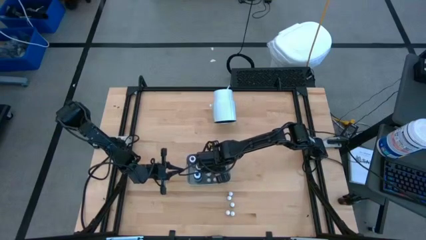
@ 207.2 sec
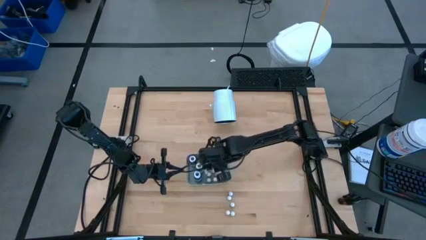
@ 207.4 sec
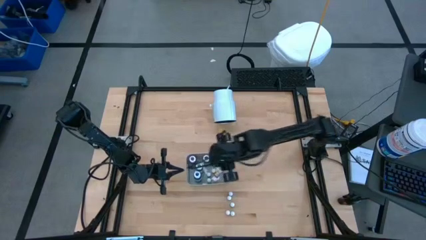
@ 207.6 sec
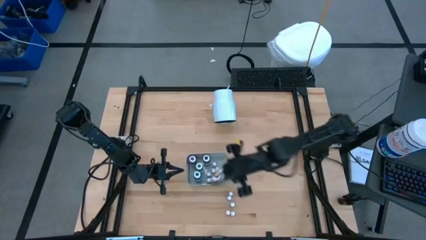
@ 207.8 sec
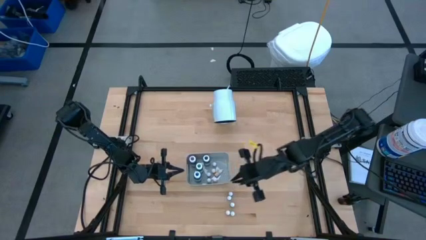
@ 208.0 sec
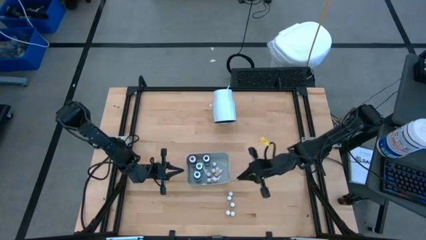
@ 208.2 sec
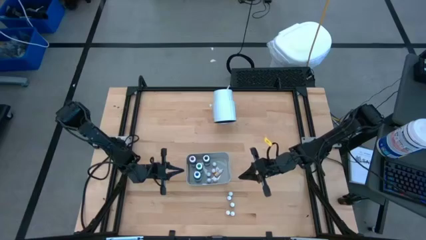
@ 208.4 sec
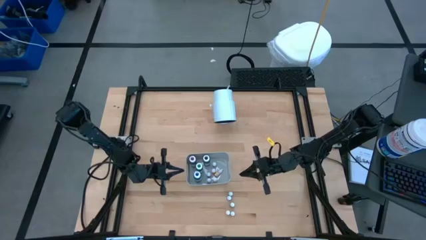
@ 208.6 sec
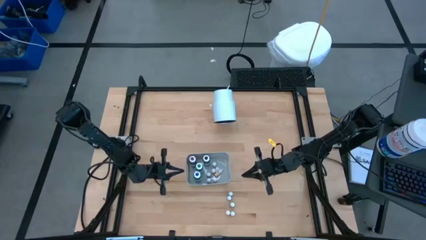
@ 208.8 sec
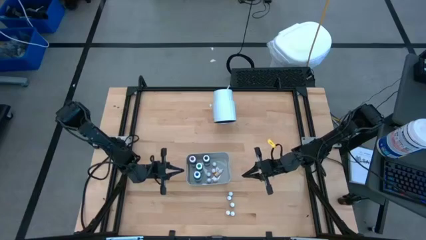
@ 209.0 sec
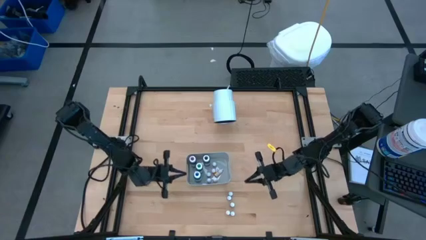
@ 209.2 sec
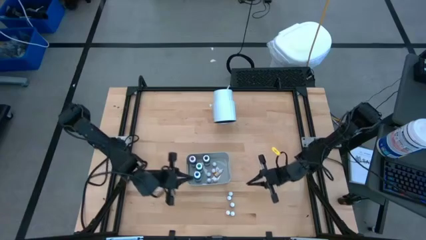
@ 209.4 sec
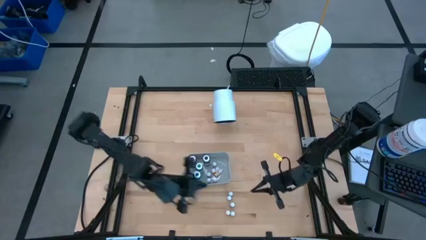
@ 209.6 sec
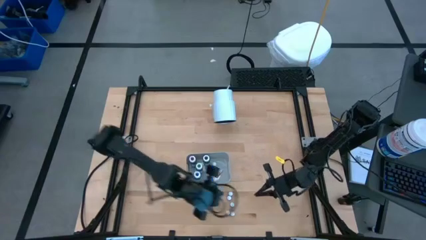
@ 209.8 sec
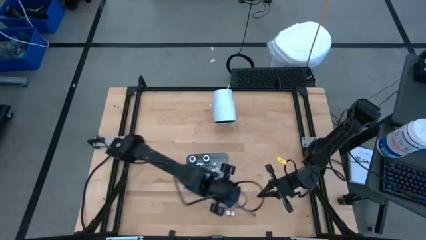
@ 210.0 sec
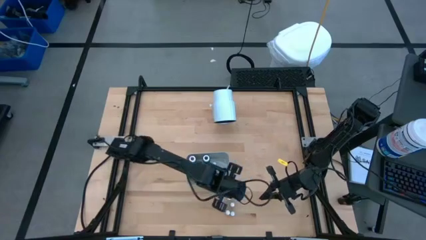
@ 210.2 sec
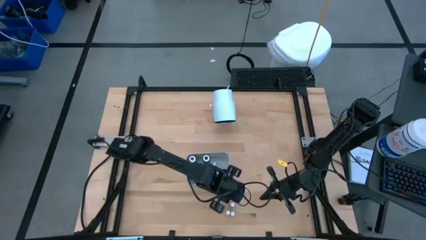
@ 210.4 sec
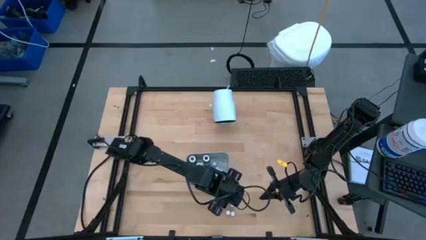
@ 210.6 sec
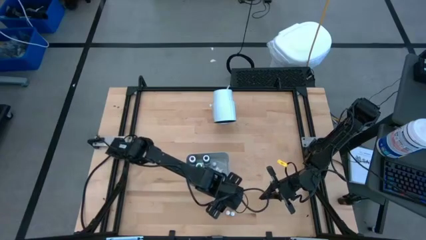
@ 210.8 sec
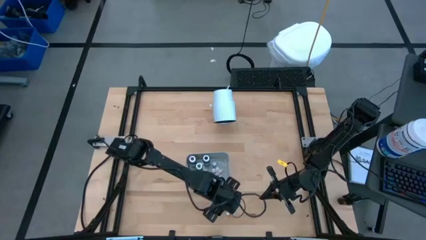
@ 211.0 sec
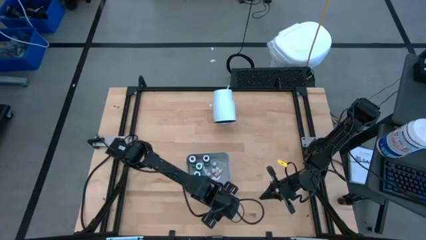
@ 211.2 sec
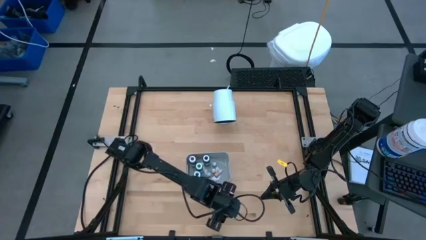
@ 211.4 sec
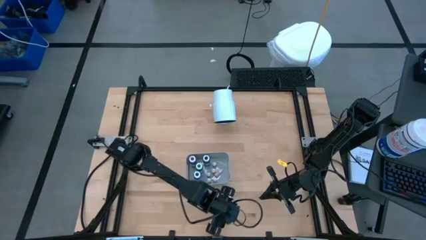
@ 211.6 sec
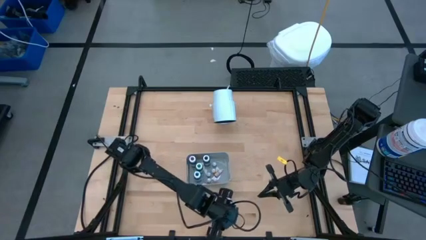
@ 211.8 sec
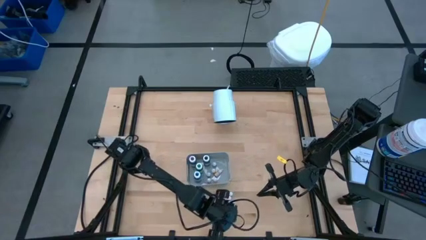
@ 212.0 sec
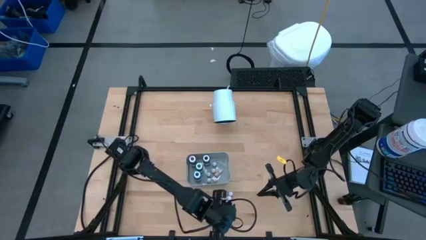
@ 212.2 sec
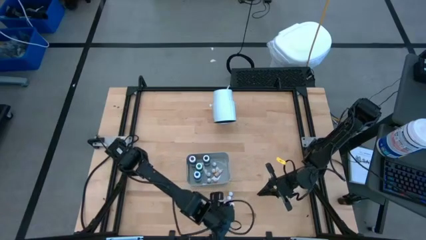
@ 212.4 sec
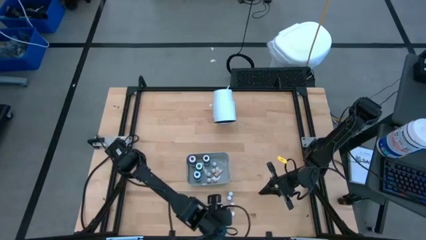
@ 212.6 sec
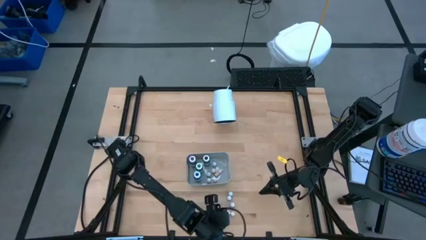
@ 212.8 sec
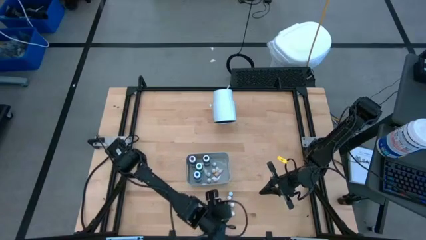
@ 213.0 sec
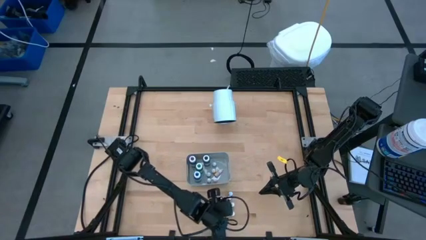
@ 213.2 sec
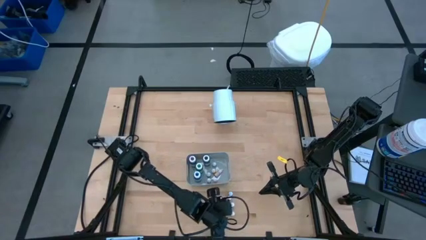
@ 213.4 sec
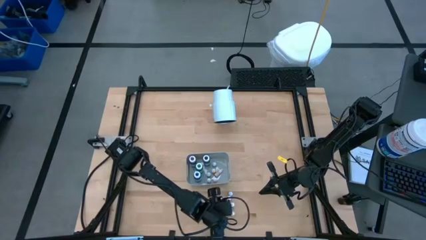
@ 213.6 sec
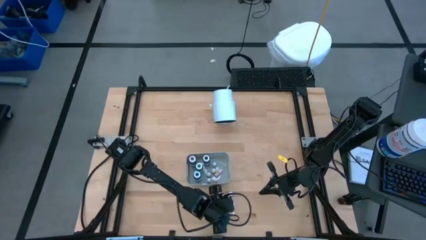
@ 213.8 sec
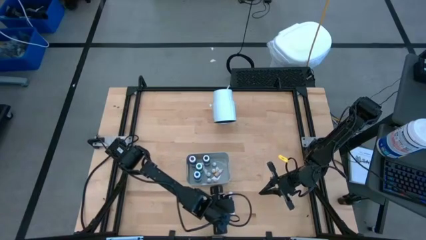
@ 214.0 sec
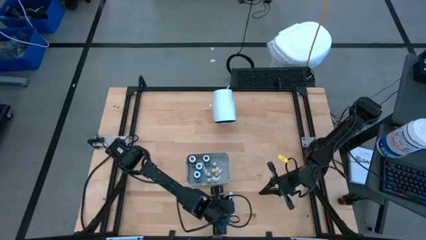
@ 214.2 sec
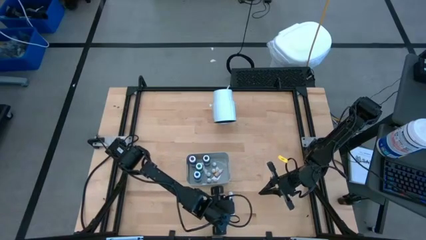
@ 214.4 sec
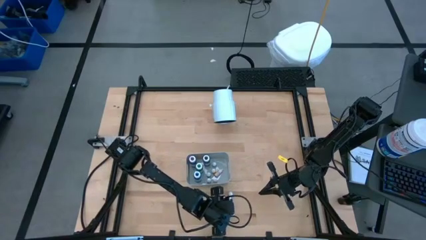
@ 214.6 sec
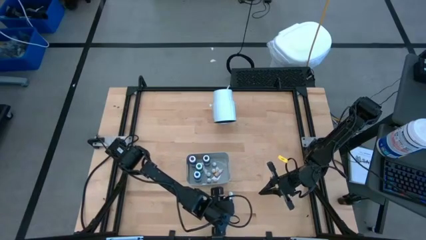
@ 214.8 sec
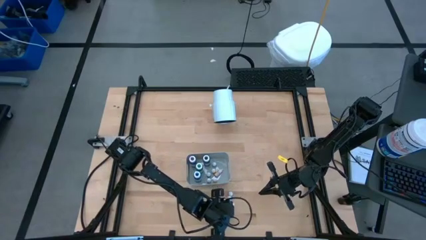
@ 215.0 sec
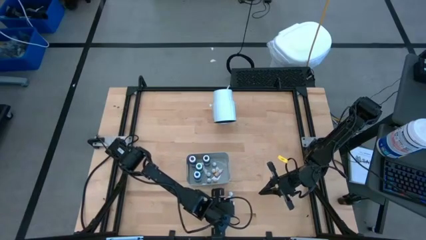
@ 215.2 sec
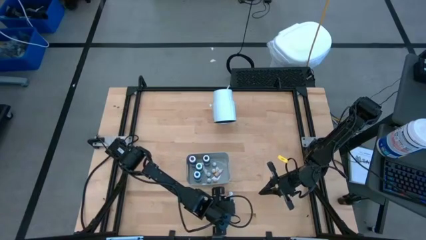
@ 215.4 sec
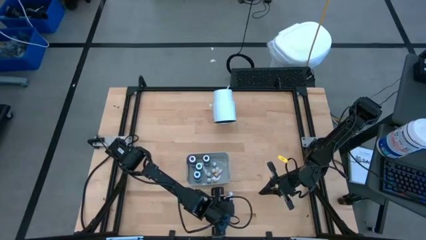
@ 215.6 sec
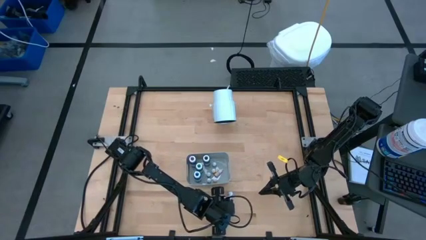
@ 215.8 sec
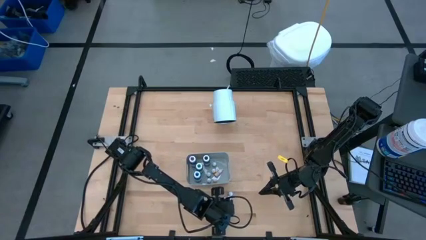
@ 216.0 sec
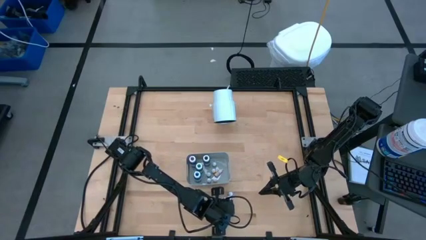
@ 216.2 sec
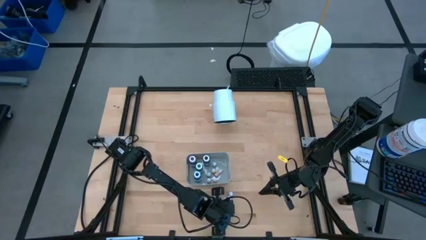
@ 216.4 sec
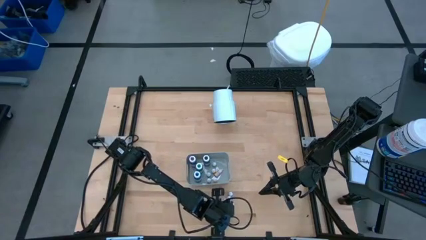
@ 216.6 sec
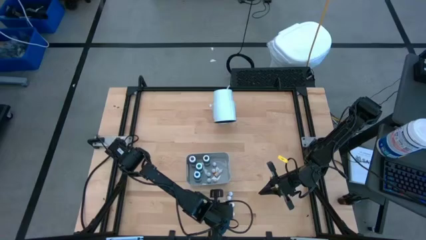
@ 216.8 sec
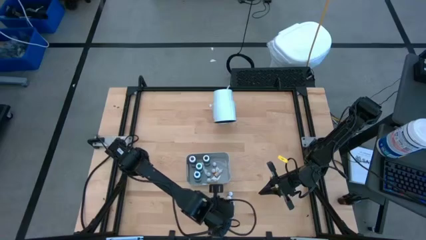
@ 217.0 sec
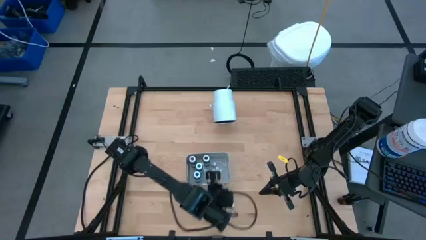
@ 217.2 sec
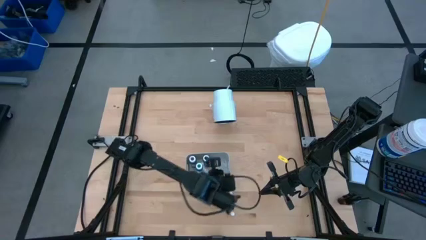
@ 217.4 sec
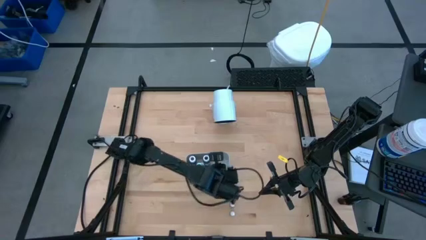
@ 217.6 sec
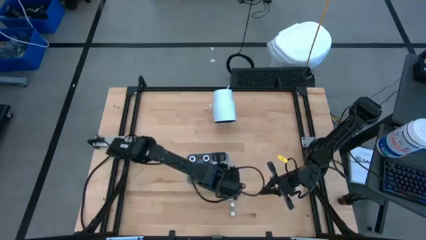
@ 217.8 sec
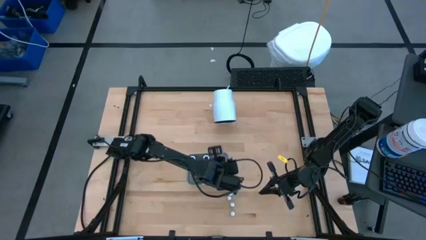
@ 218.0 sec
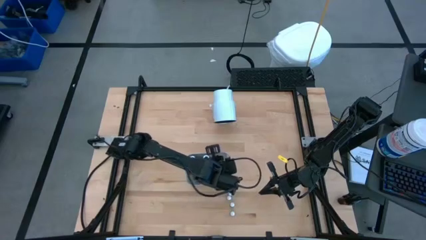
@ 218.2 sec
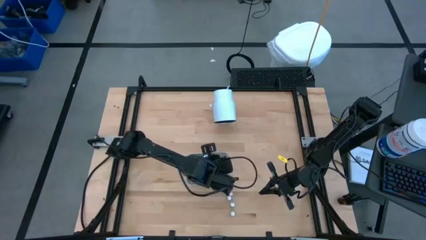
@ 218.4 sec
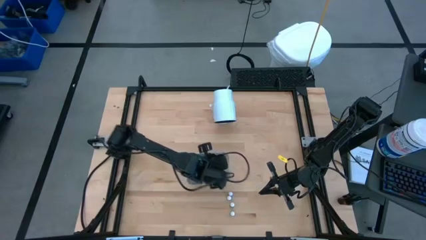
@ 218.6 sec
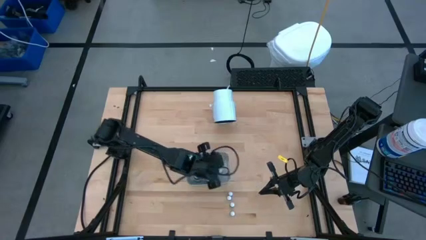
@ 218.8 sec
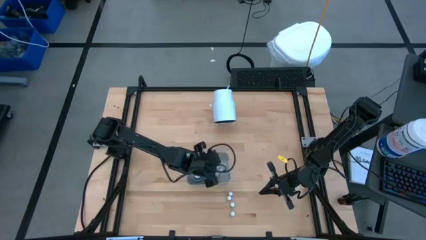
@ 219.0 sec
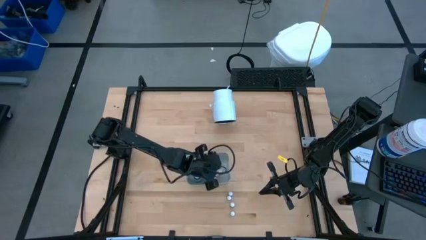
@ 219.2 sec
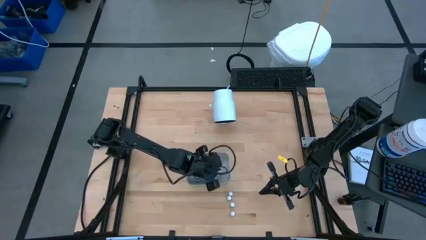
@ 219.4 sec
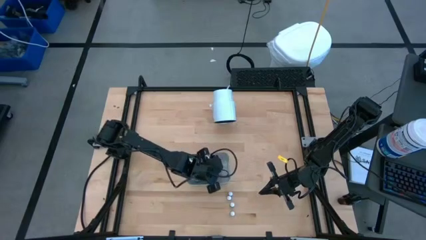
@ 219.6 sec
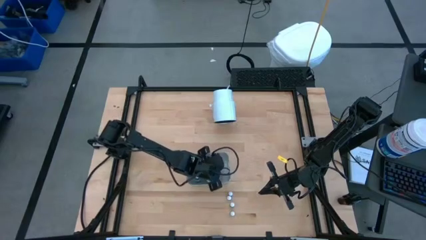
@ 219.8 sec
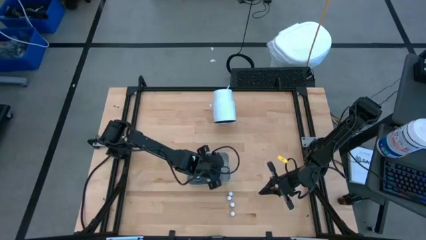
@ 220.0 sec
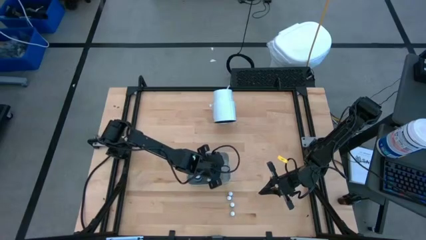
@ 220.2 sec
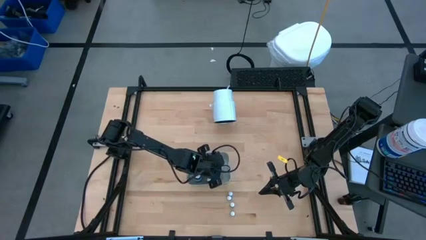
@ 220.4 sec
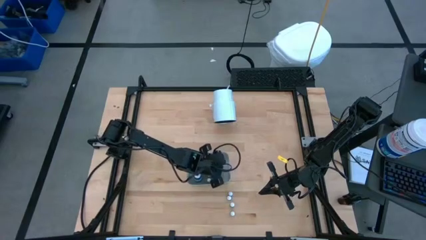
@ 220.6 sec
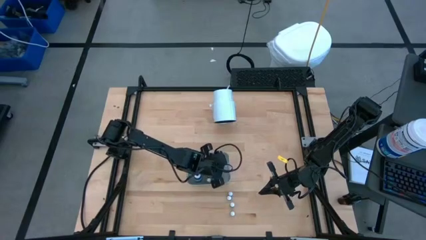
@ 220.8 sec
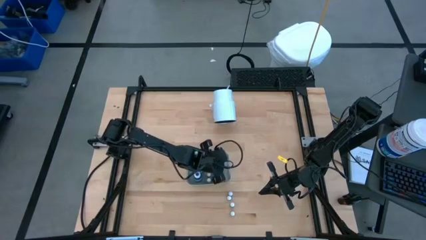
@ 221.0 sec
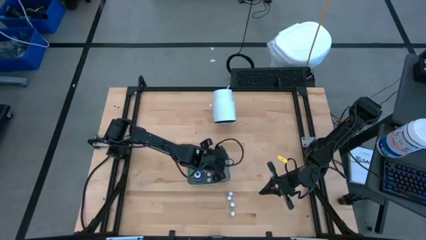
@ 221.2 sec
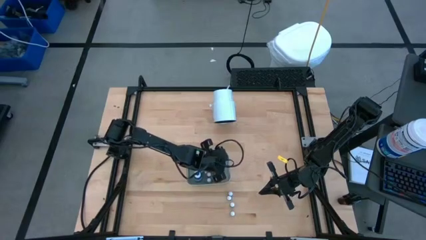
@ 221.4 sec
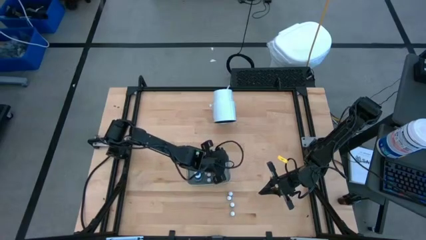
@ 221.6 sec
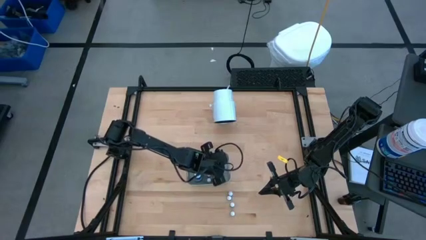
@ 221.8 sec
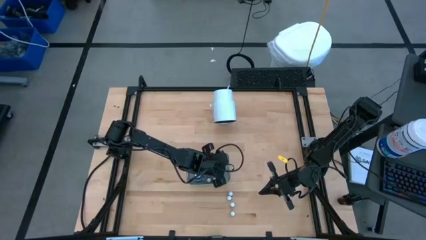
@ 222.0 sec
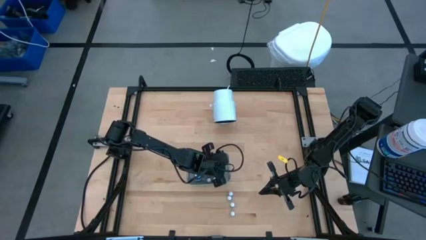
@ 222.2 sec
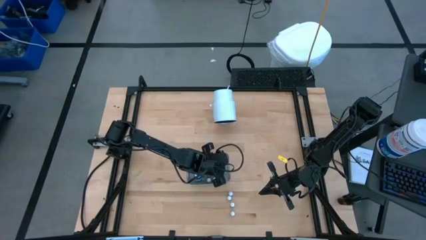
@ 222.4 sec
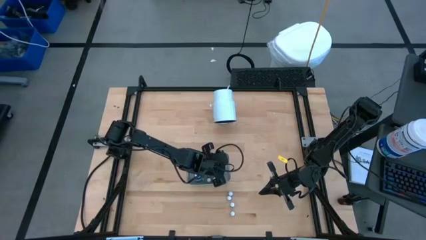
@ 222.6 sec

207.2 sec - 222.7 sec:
Task: Pick & Place food coloring
Put the orange food coloring bottle into the gray bin
